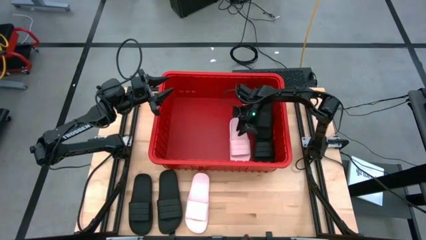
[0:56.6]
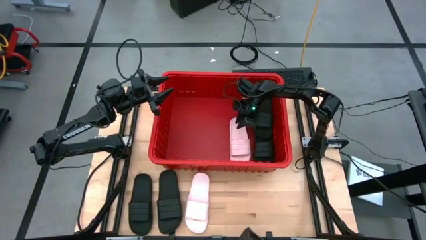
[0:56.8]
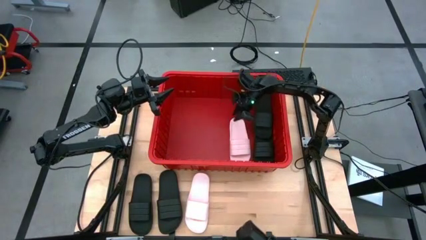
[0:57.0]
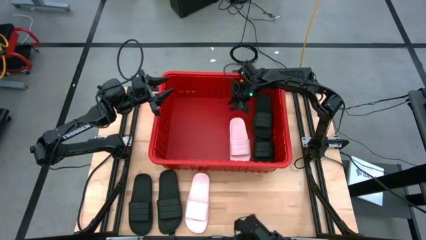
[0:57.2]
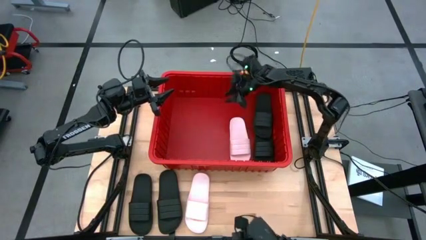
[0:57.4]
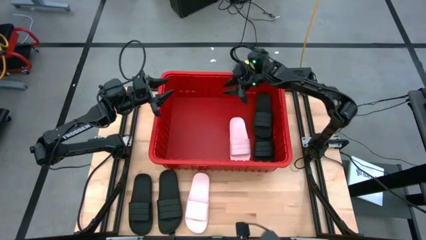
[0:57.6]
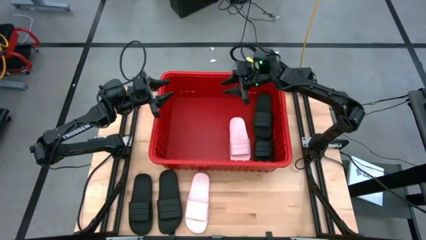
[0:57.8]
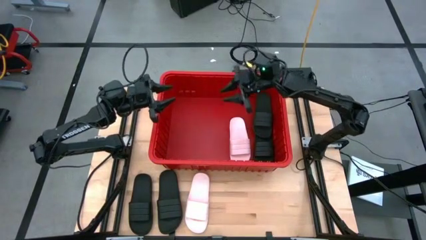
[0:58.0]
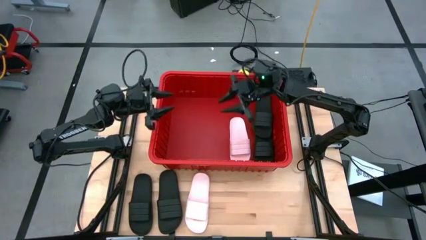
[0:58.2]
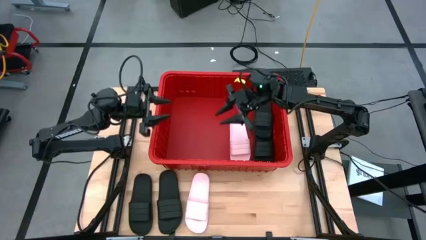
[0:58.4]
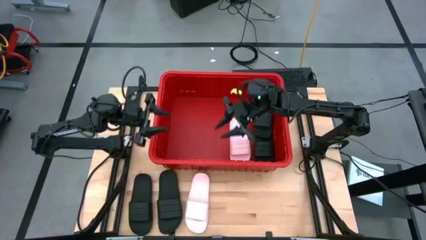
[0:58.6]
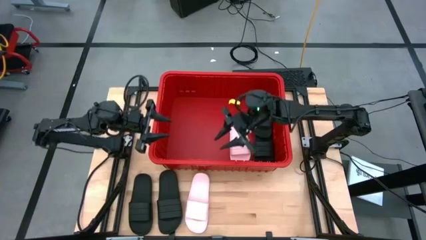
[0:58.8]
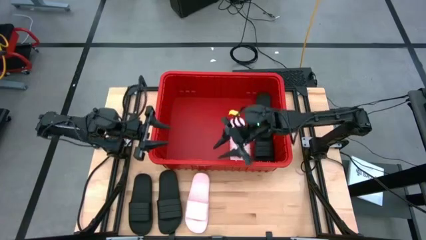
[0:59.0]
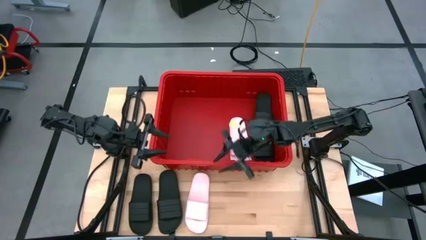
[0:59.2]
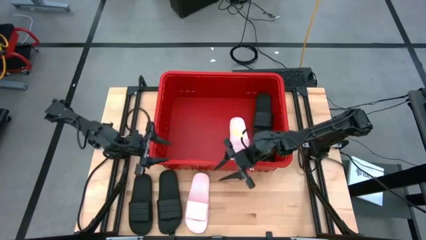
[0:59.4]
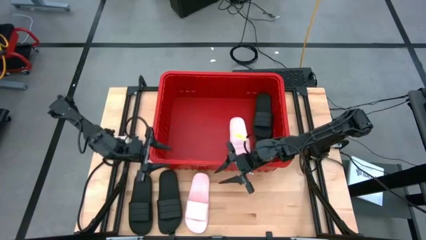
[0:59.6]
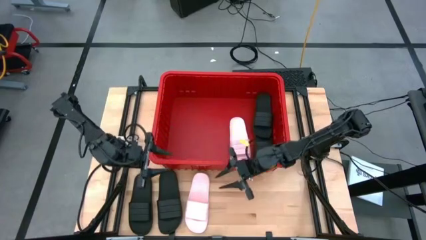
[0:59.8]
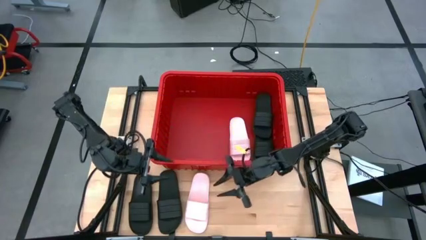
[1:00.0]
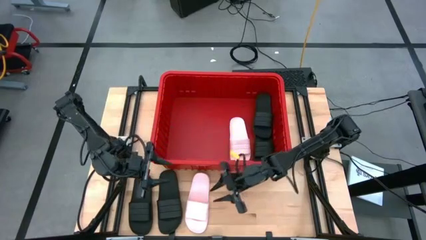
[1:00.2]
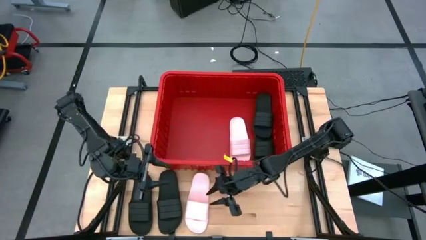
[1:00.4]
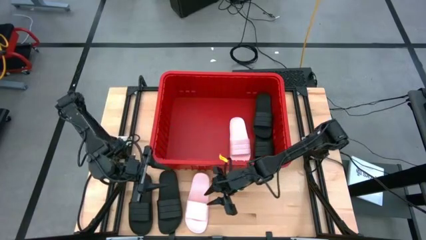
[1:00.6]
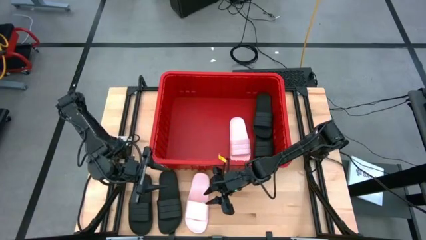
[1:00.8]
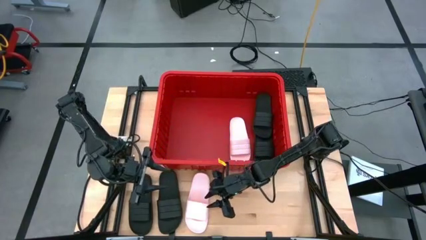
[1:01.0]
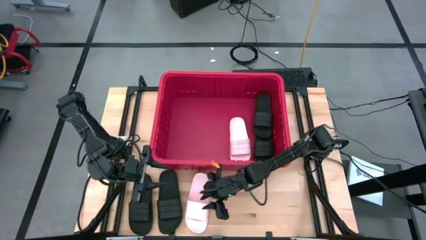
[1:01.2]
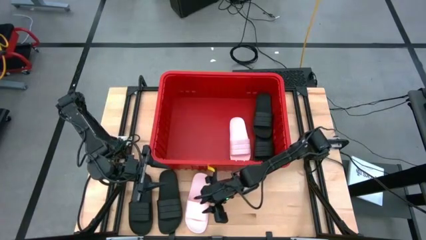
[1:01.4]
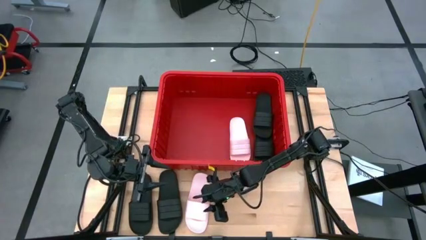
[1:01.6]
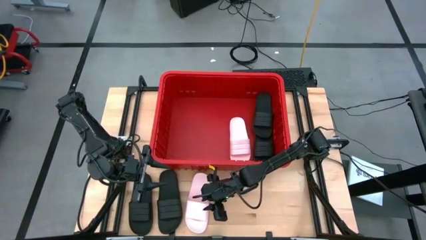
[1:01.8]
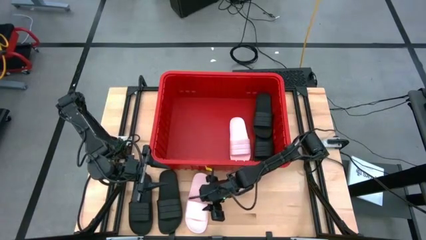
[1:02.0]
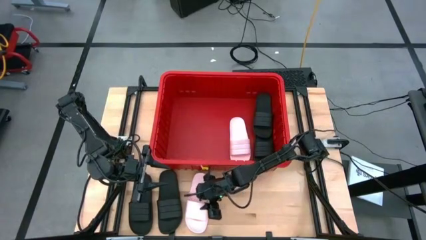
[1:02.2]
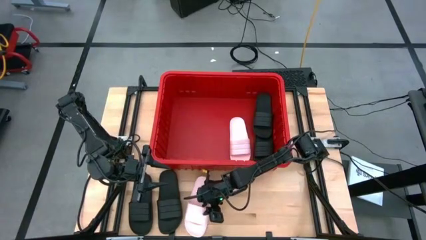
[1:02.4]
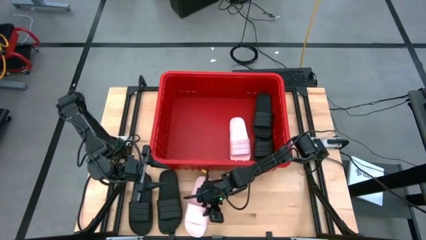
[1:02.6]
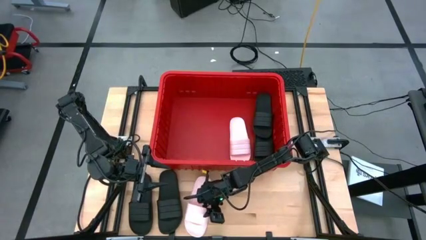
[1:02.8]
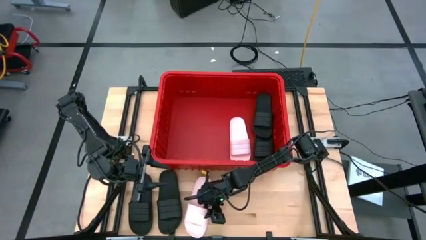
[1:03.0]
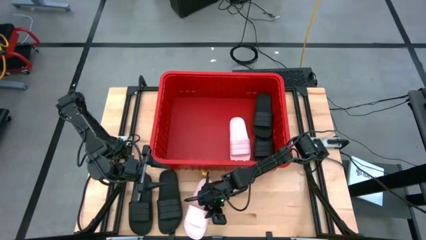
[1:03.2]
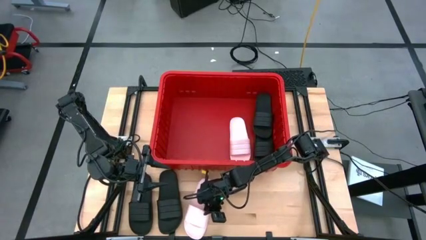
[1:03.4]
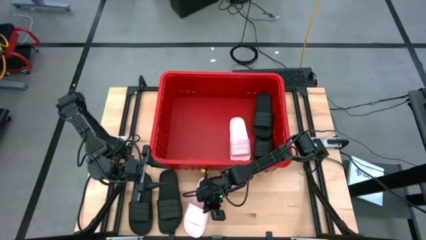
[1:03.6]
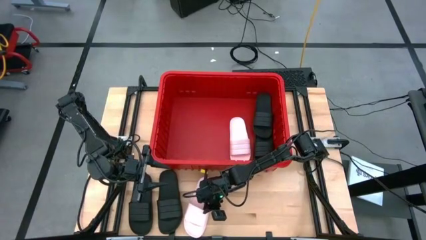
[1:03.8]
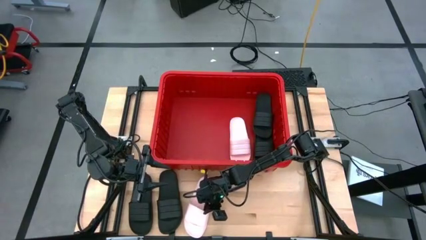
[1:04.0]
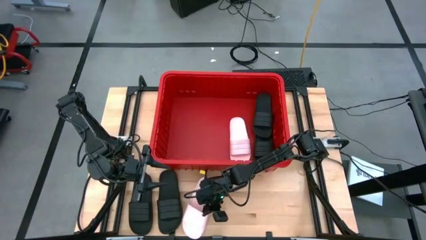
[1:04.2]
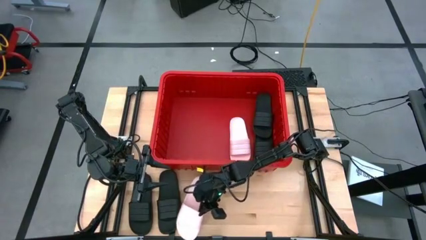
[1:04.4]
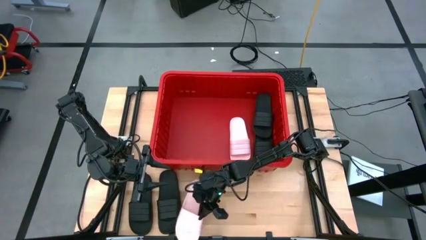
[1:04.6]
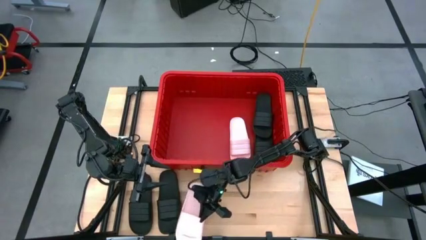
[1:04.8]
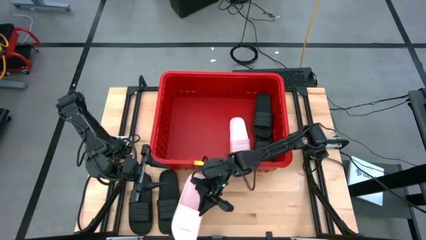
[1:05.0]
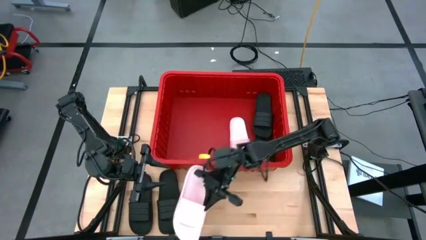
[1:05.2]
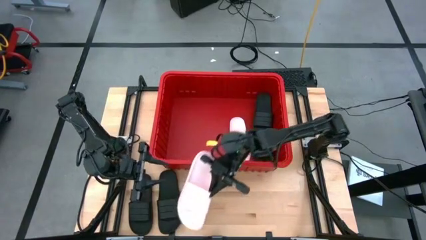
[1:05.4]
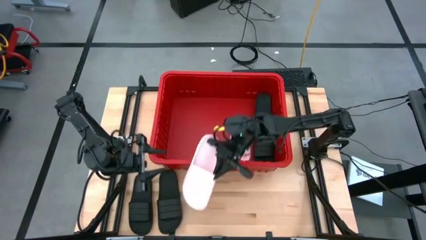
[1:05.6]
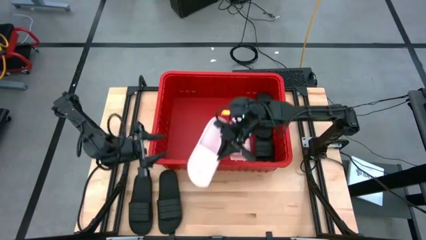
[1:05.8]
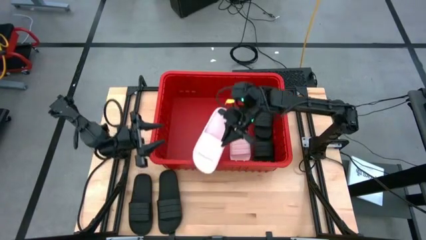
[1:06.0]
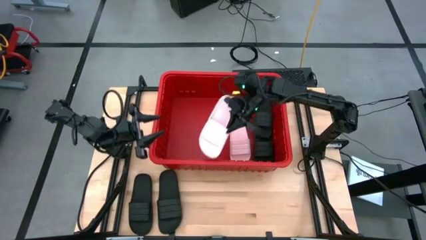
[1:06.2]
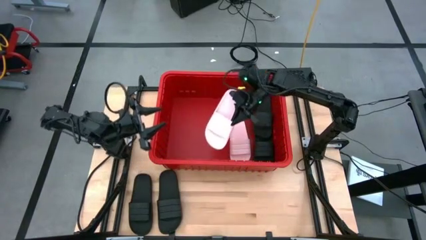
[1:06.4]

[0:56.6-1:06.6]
Task: Pick and place slides into bin
Put the pink slide into the red container

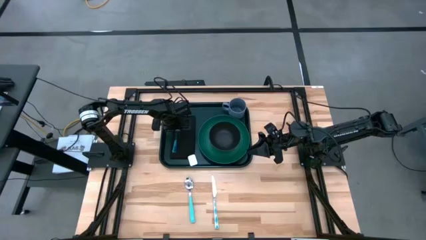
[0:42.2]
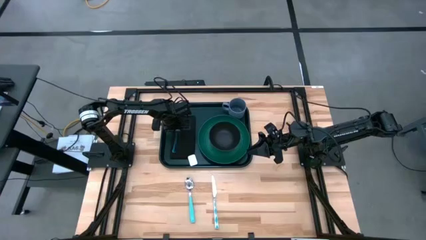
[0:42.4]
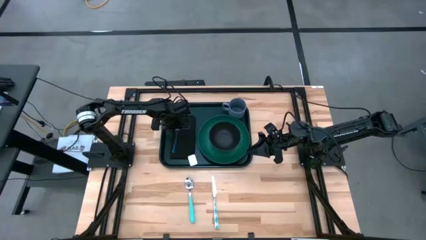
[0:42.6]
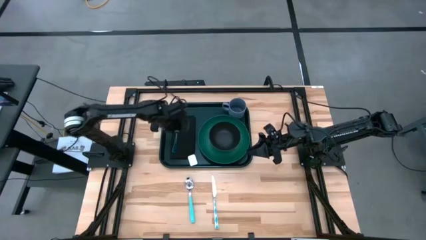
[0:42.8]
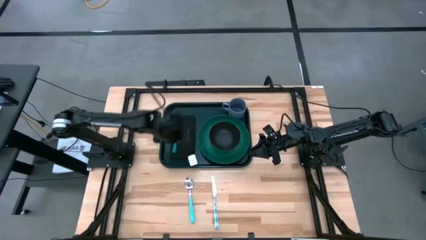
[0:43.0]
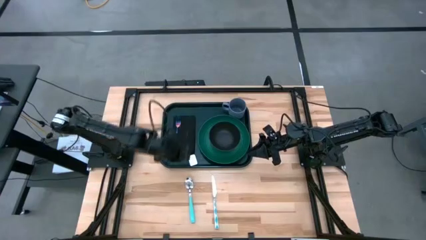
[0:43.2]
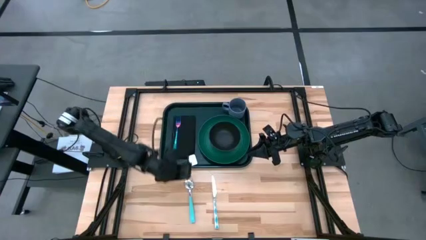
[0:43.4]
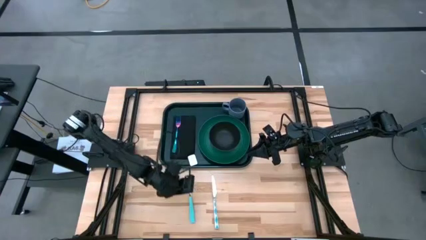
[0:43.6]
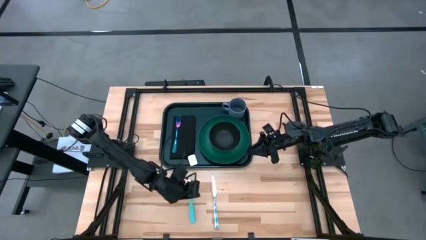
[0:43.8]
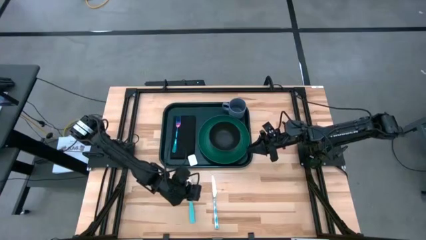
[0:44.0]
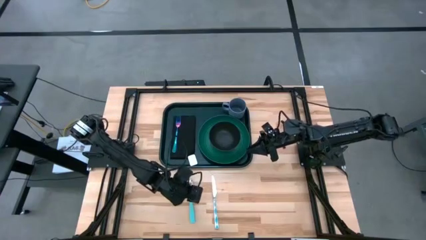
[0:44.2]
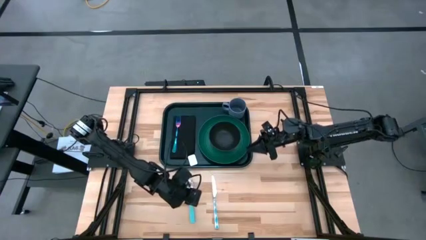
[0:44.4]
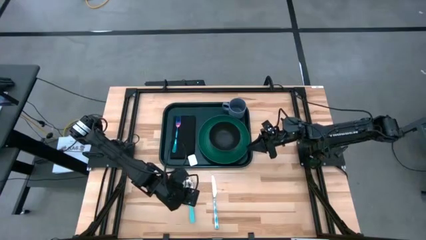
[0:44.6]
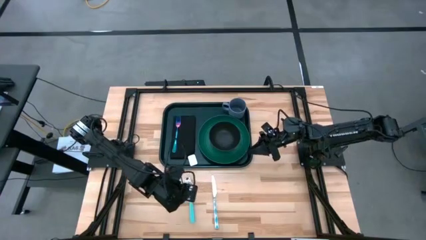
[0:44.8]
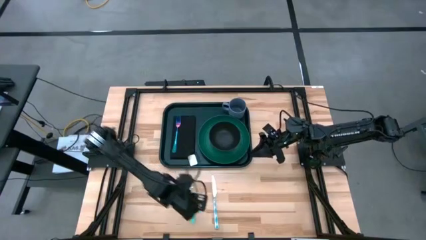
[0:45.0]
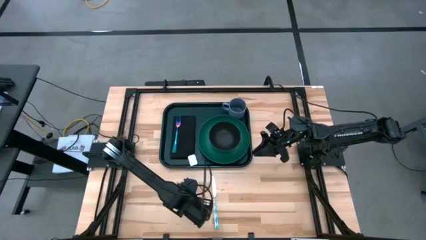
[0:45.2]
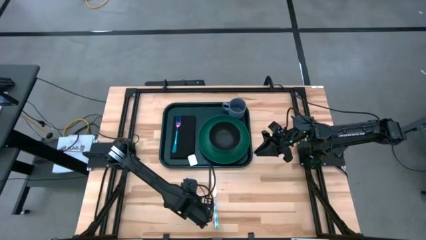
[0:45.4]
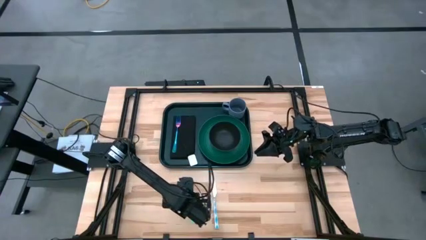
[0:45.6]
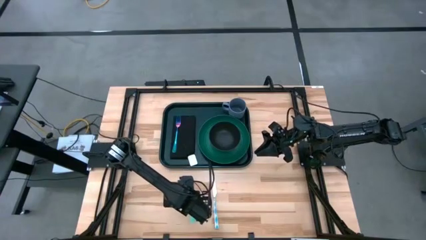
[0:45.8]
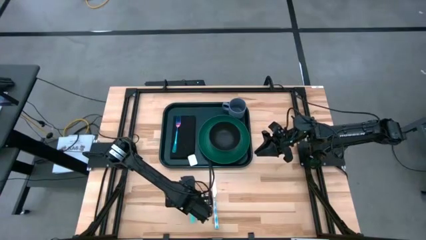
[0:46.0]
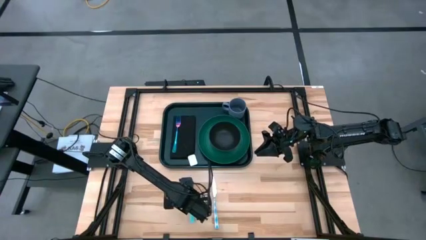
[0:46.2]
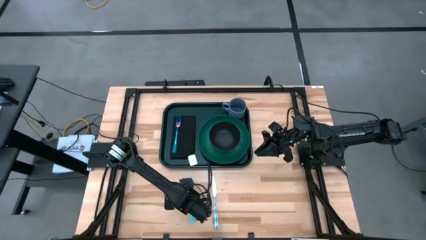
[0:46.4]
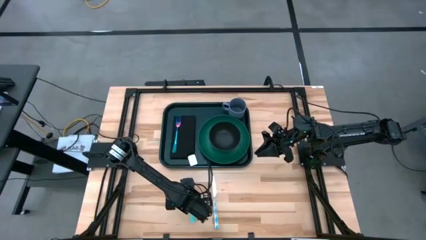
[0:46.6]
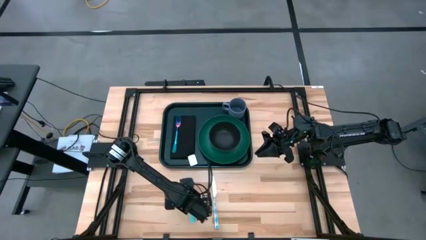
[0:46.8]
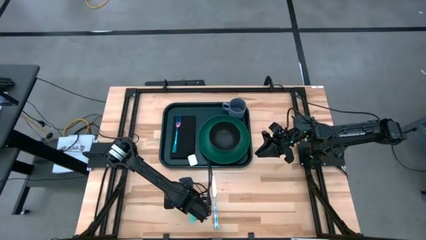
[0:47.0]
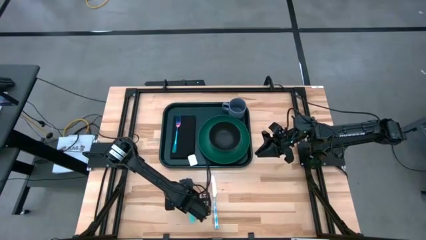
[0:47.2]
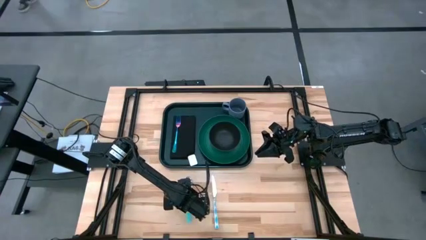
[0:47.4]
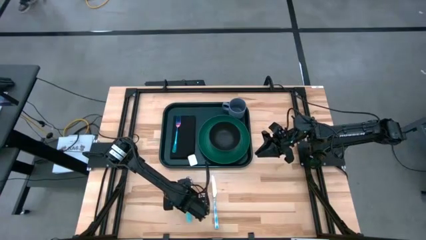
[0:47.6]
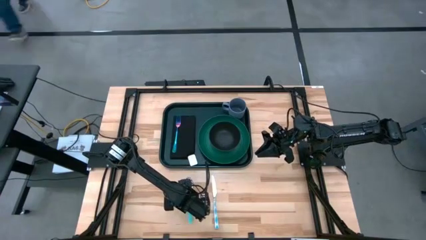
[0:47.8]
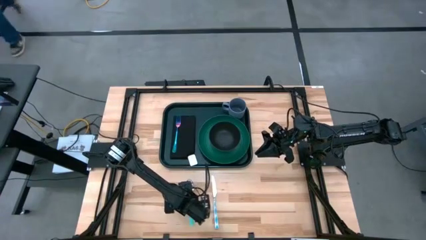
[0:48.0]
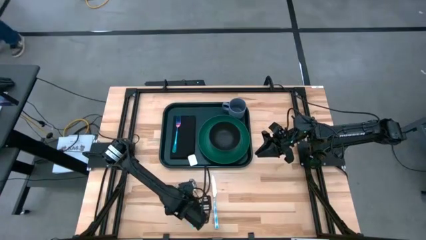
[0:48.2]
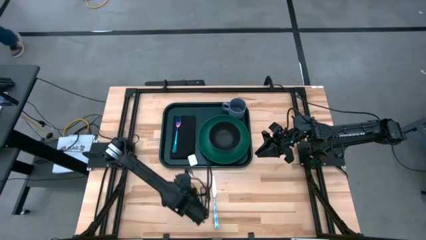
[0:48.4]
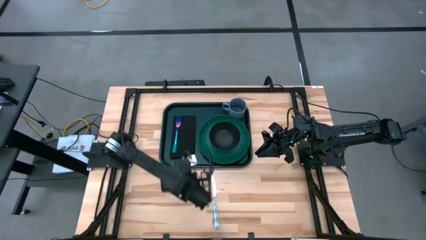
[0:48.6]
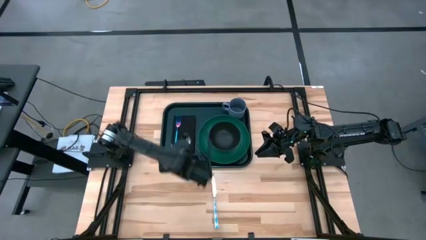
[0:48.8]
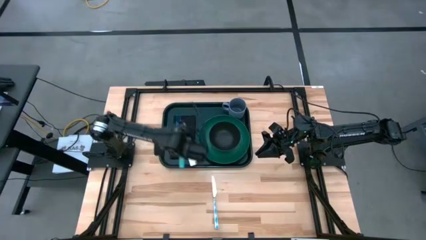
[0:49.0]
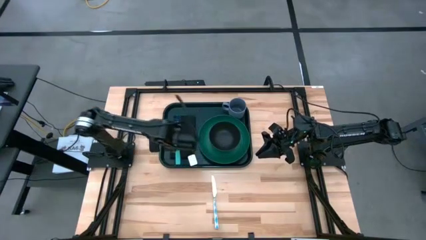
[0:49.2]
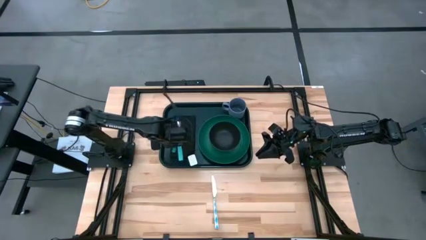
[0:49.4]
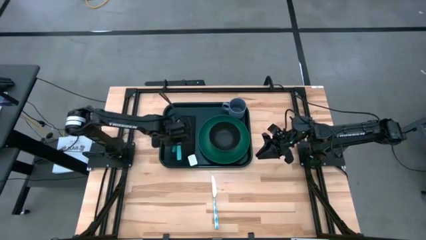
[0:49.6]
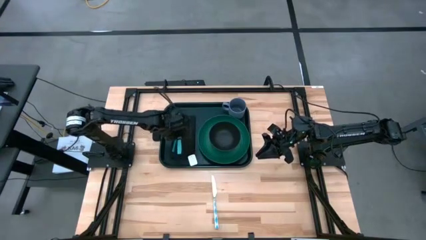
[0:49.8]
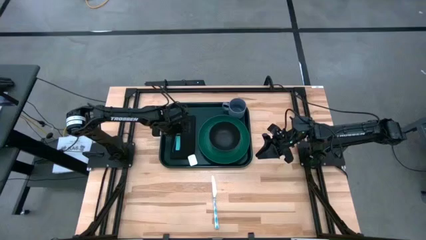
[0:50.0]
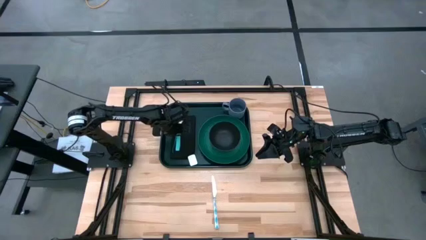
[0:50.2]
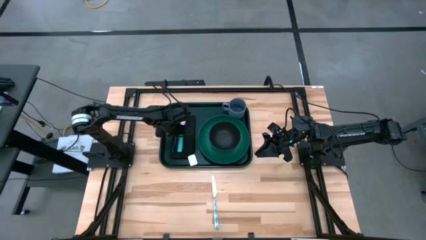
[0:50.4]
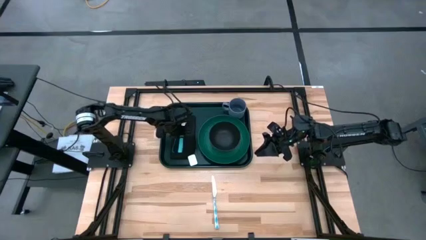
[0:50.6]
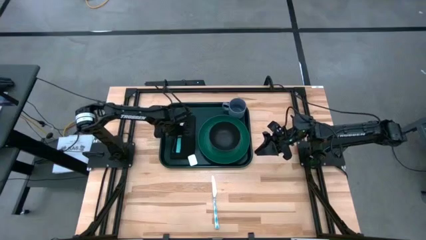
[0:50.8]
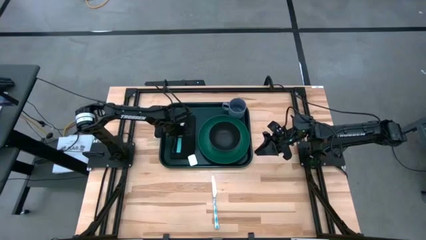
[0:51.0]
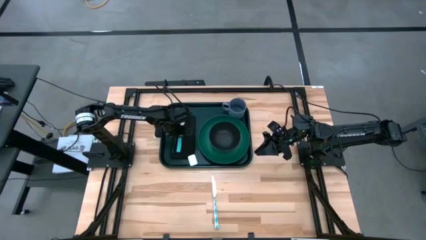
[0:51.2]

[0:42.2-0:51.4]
Task: Set up tray
Put the blue spoon on the black napkin to the right of the blue fork
